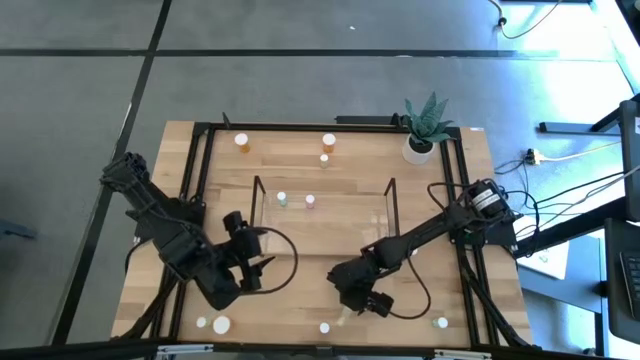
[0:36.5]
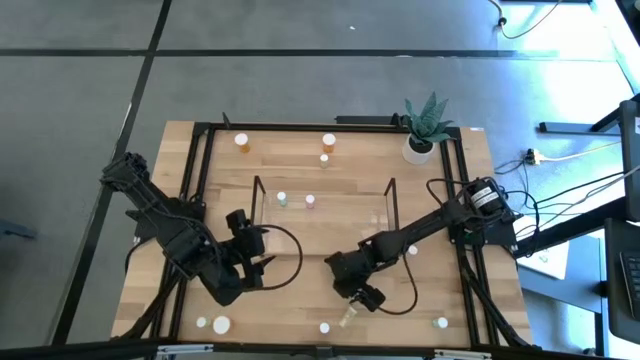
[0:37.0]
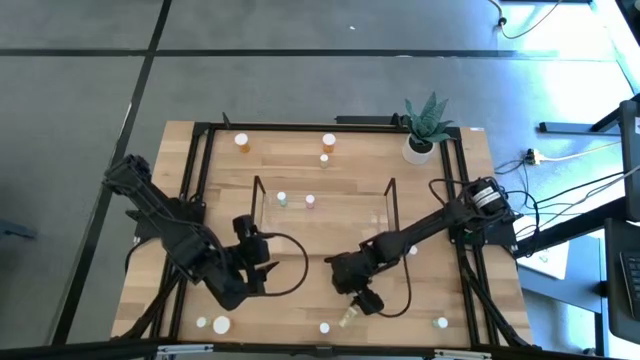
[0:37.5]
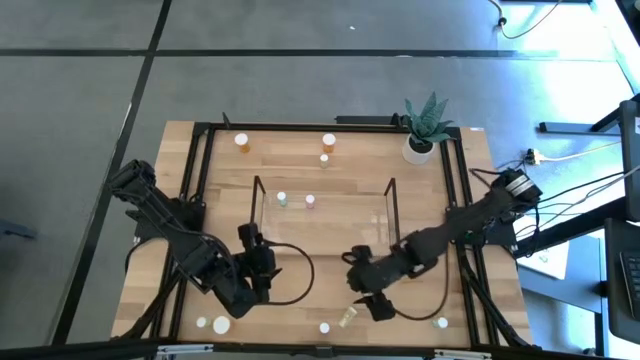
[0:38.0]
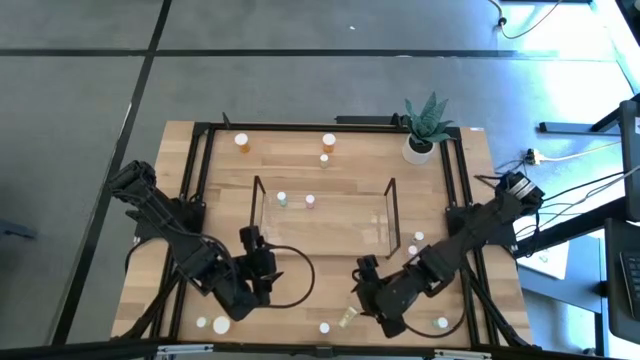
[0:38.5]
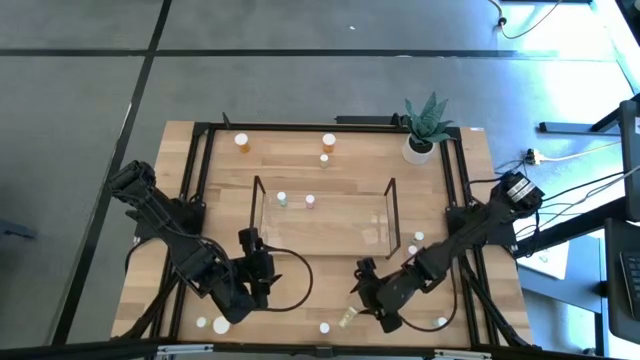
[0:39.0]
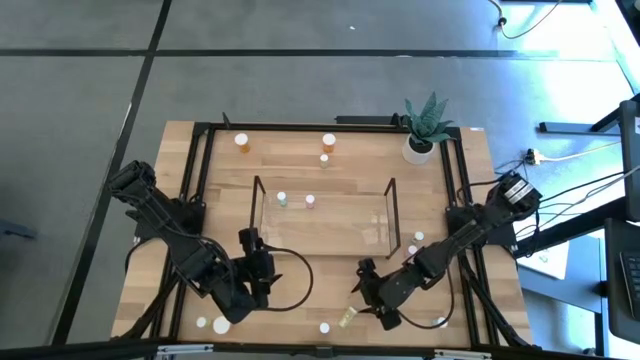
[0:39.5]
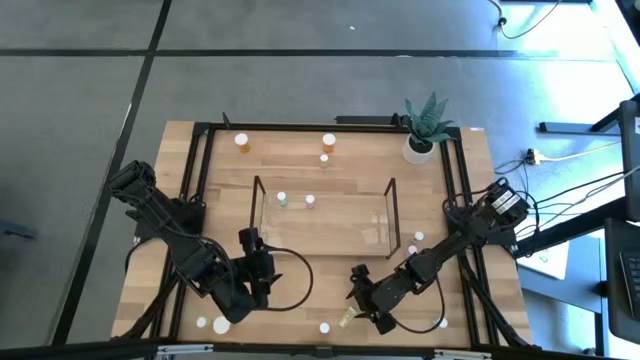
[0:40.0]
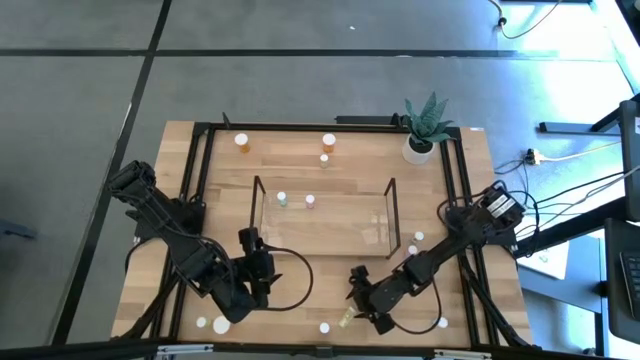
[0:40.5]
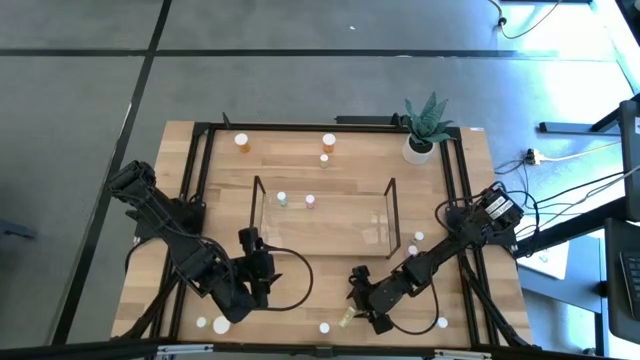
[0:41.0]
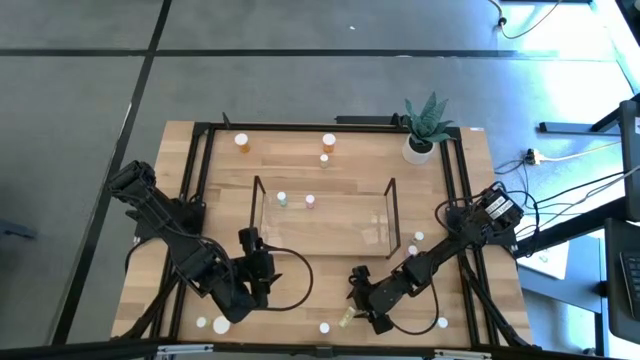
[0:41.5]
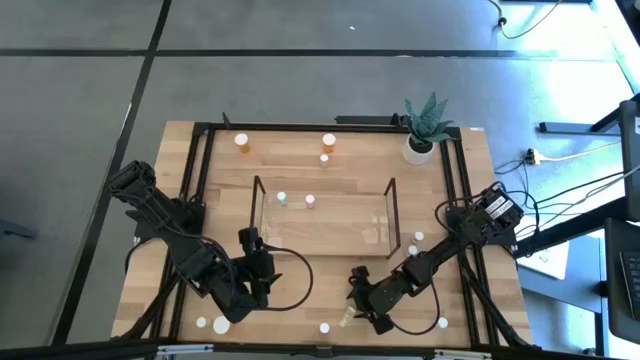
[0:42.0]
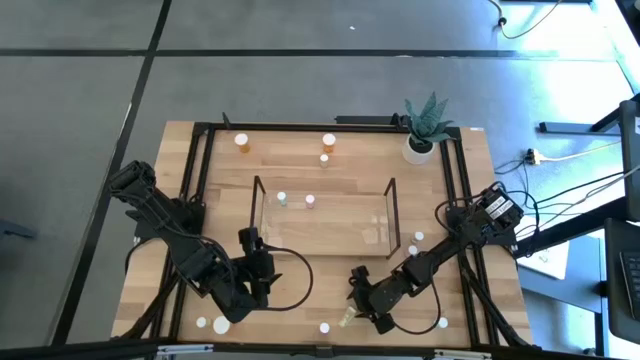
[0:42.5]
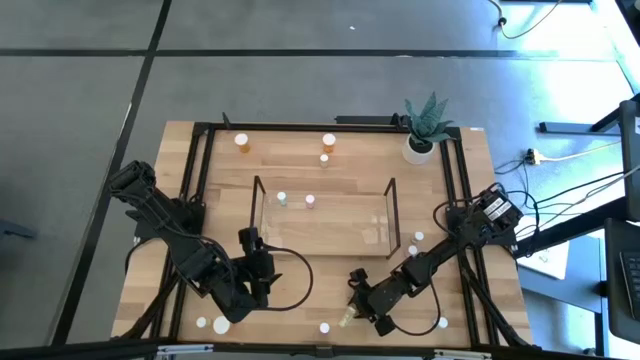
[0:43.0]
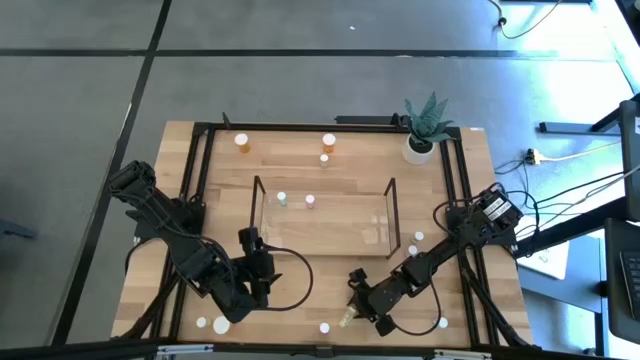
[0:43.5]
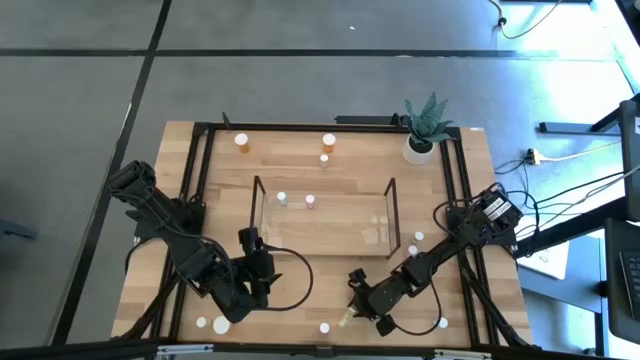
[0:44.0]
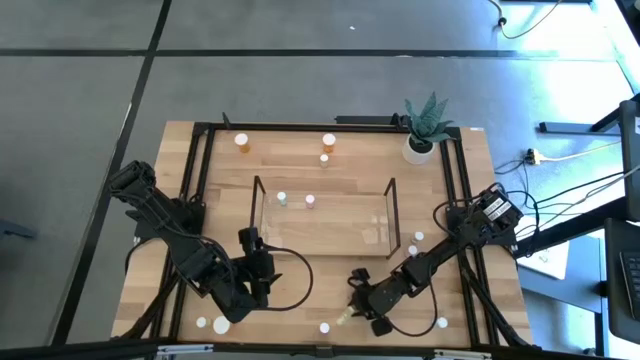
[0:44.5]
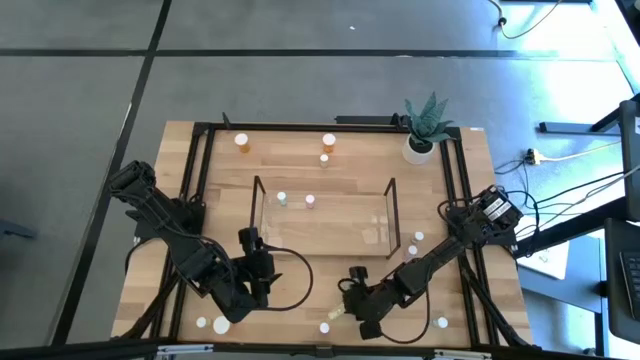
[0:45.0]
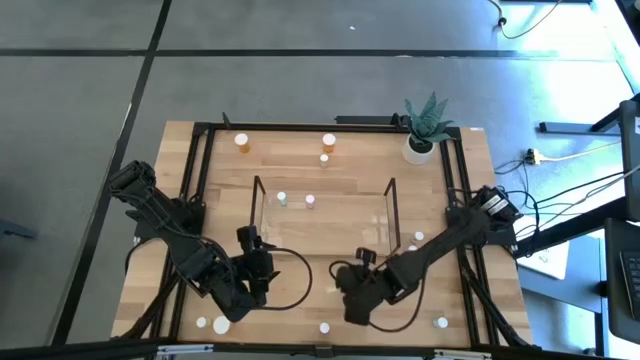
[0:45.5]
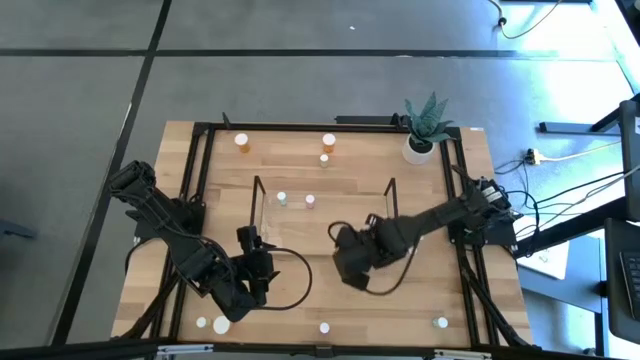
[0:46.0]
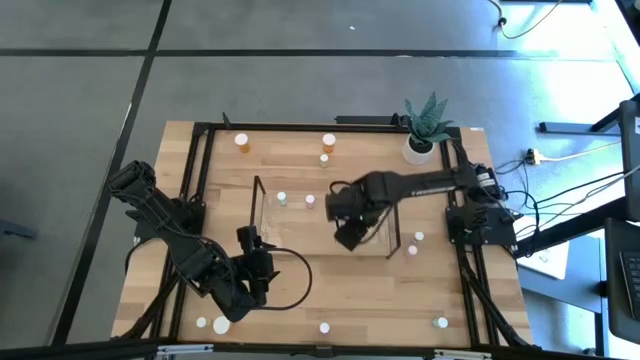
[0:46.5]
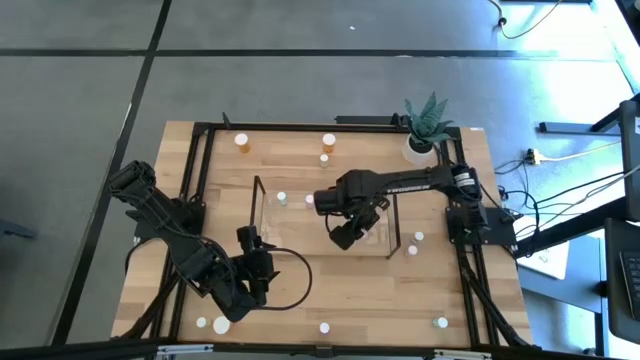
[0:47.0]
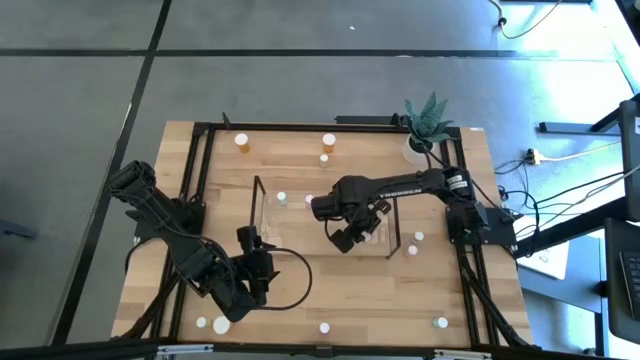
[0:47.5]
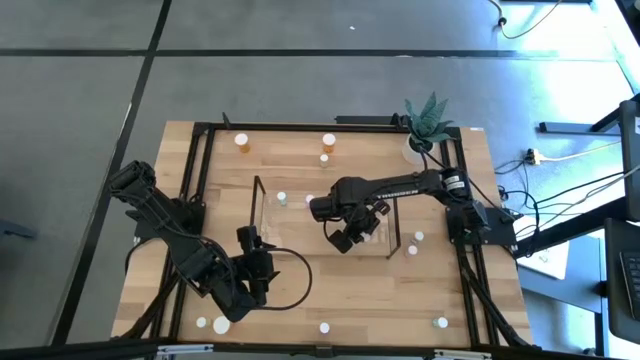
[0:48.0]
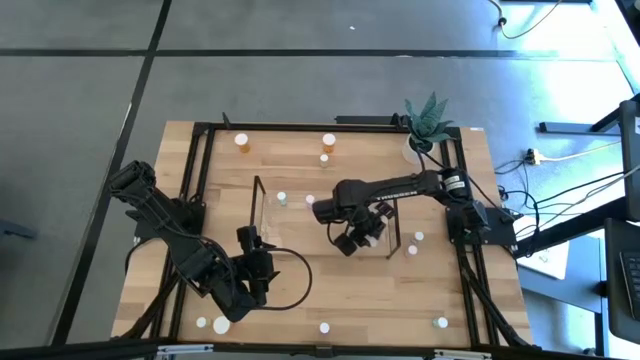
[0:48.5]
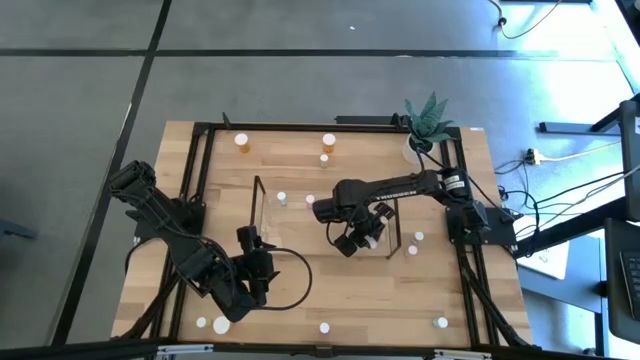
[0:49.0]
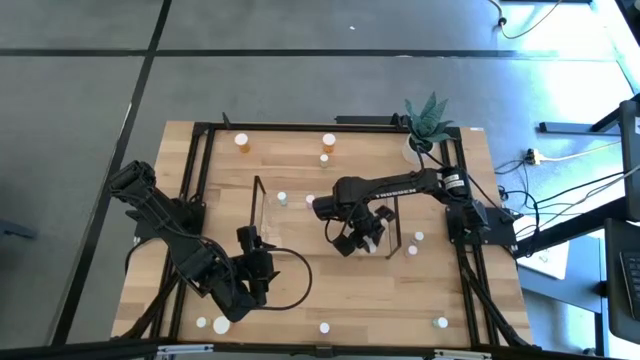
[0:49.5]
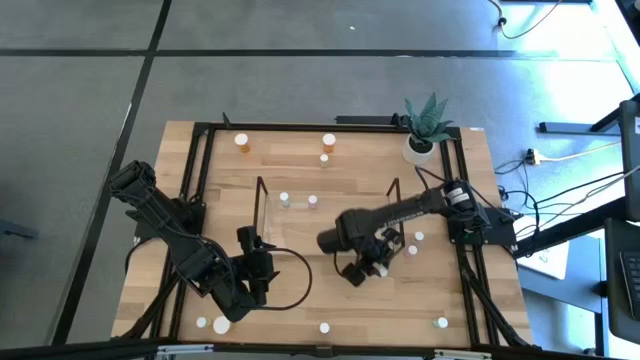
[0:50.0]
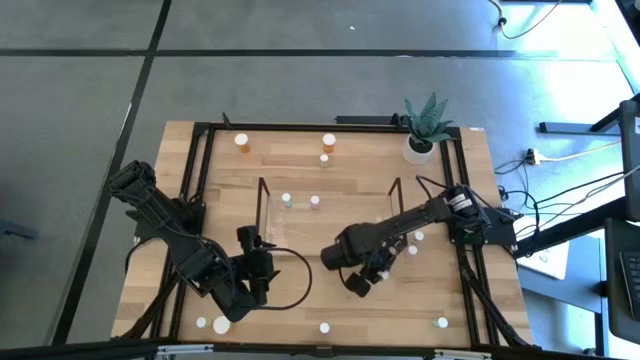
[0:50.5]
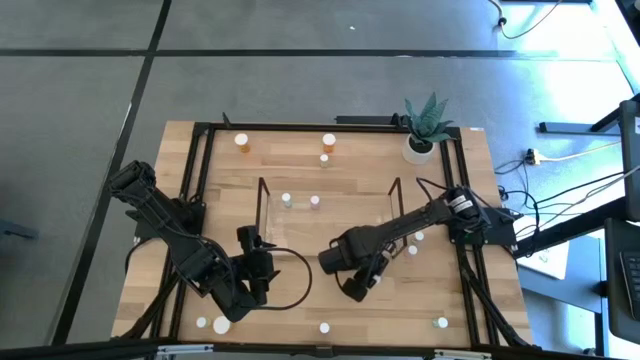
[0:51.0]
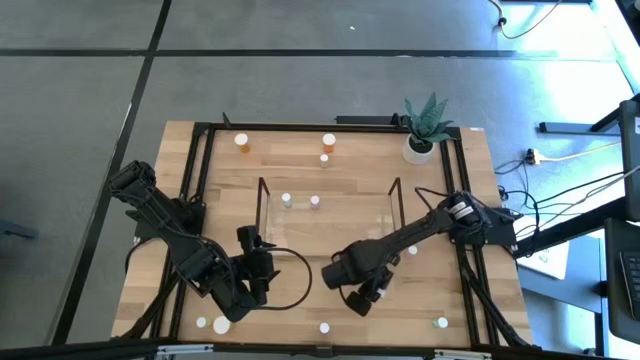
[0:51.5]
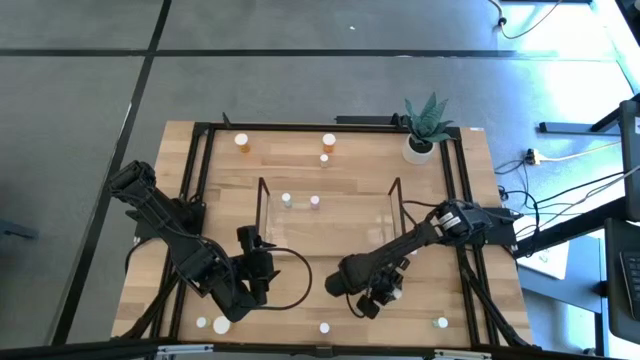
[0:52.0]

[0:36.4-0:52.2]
Task: Pick and place medicine bottles onto shelf by color
Put the bottom right yellow pill bottle on the shelf

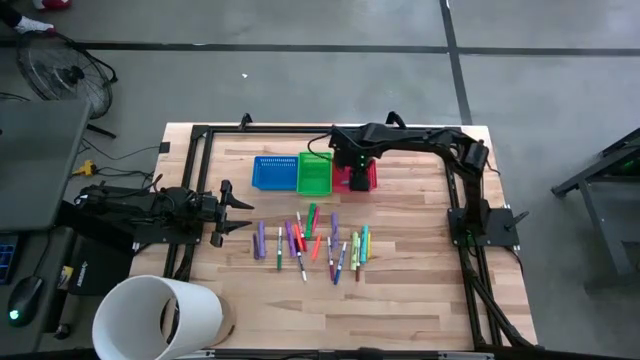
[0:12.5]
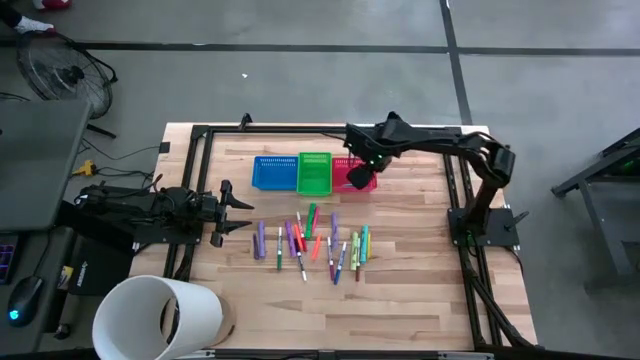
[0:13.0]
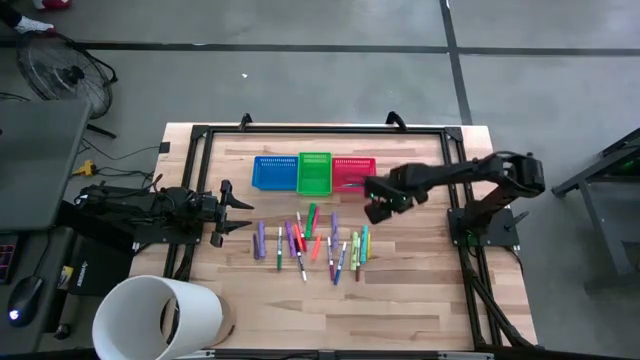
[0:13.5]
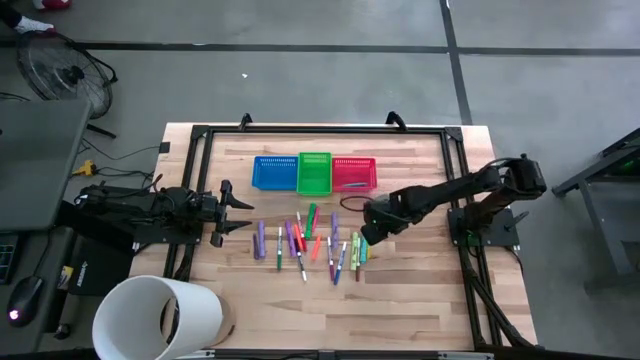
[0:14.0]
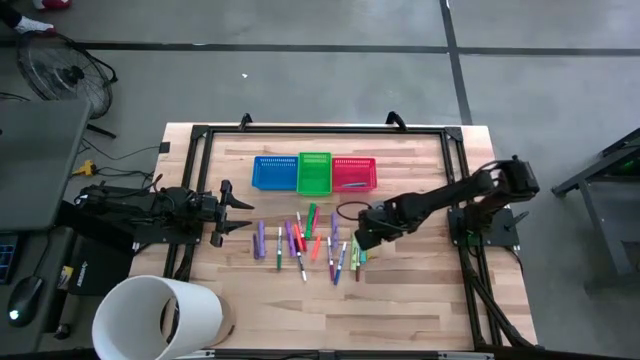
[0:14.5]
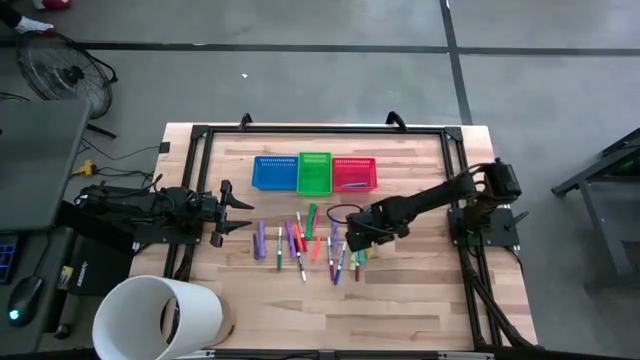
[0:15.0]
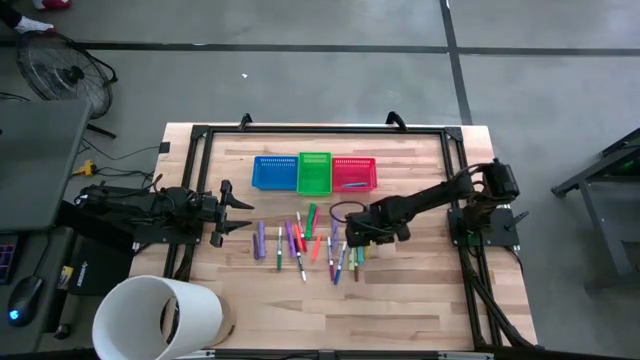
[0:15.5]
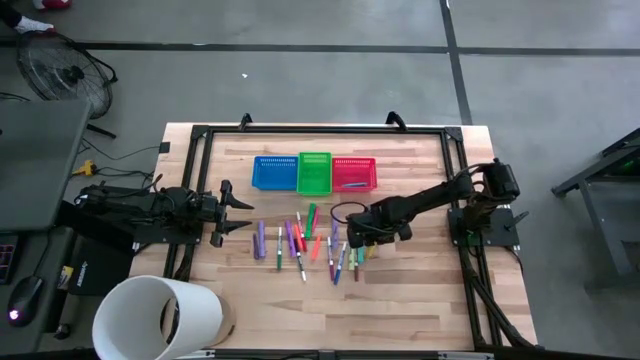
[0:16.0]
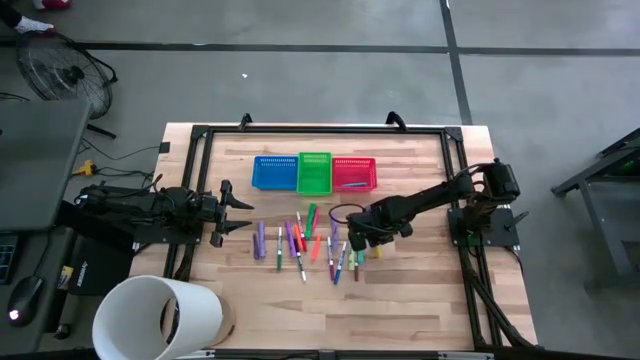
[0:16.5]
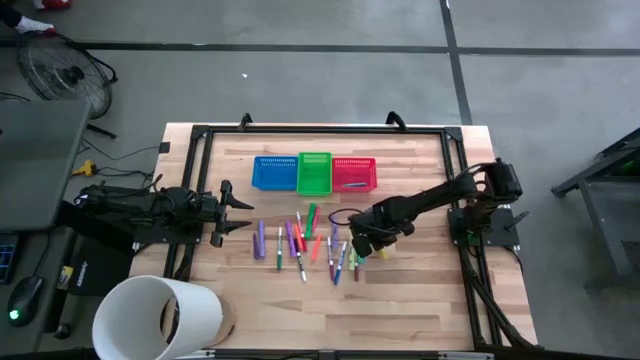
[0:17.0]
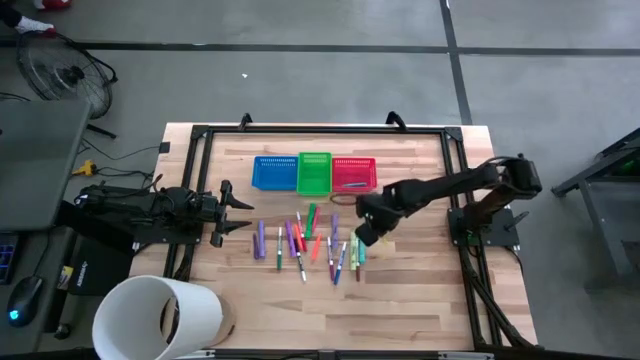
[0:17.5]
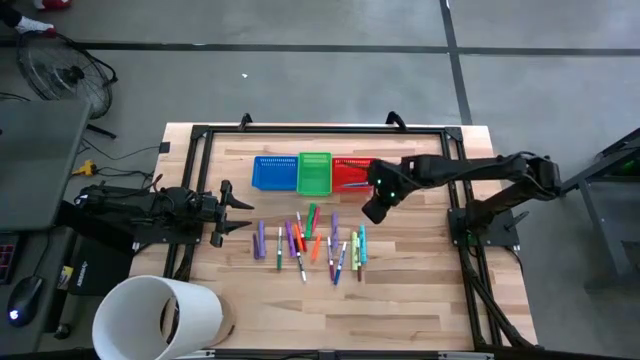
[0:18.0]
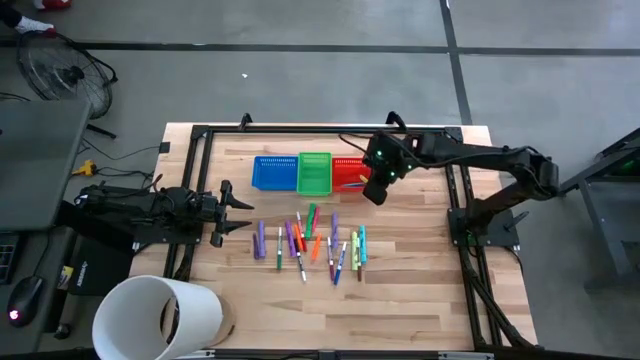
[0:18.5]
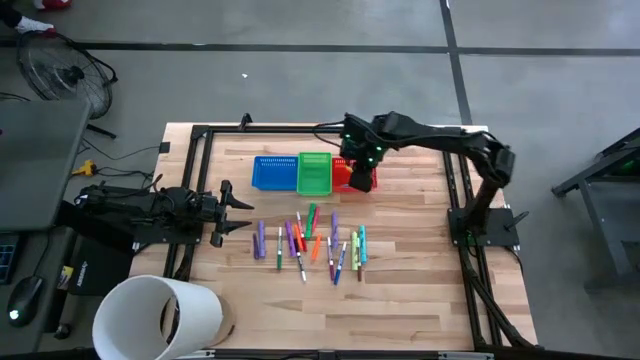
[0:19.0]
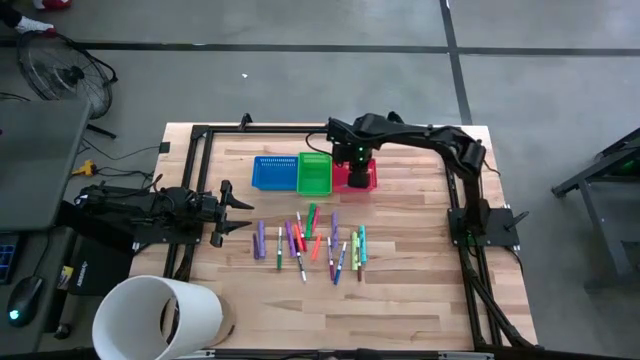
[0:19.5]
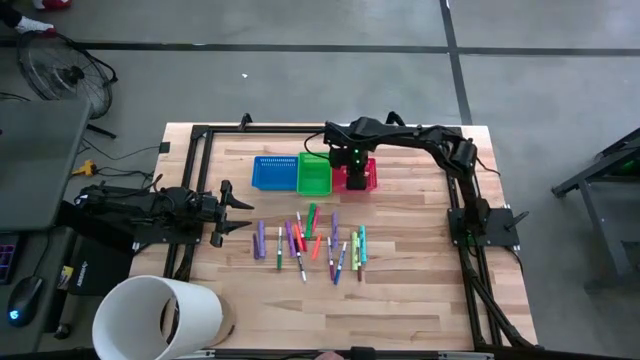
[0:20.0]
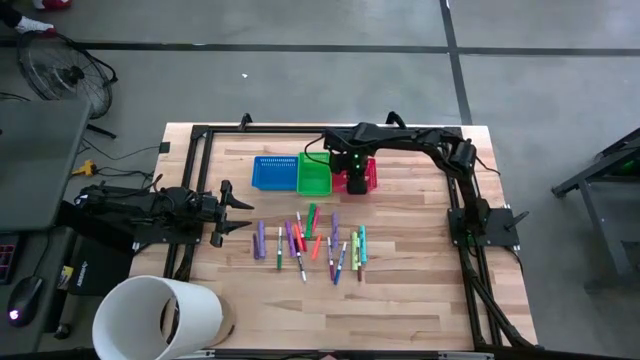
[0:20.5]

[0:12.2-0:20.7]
Task: Pick & Place Markers
Put the yellow pen into the red bin
